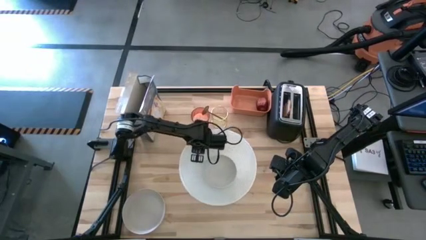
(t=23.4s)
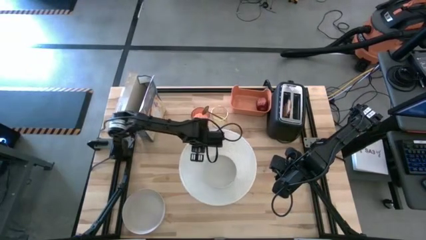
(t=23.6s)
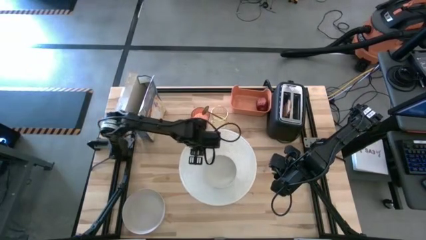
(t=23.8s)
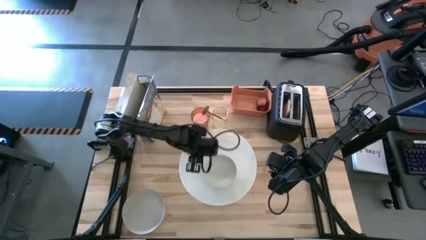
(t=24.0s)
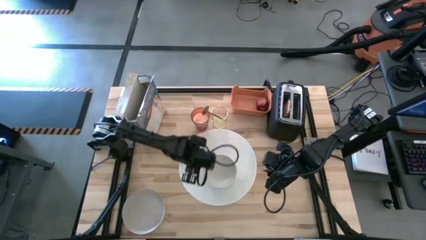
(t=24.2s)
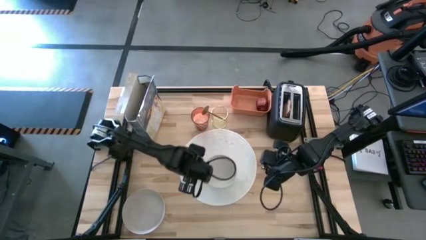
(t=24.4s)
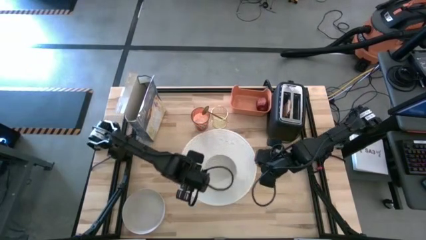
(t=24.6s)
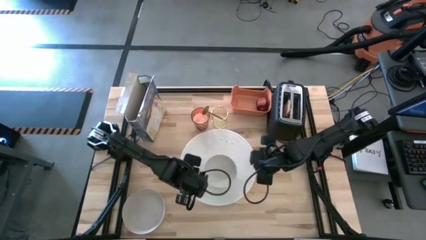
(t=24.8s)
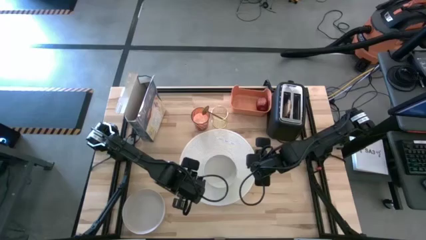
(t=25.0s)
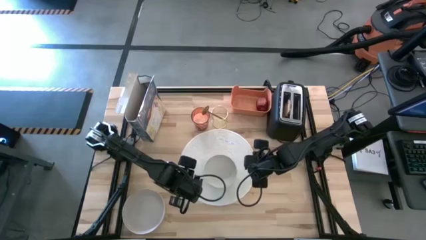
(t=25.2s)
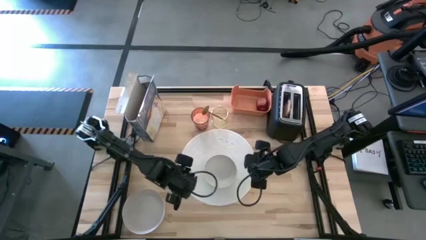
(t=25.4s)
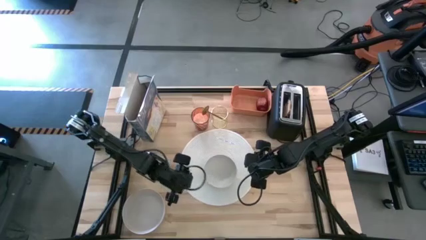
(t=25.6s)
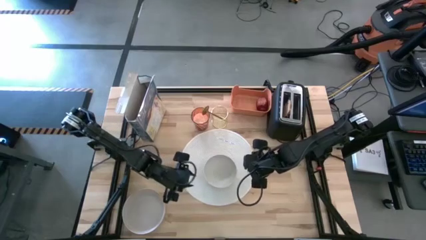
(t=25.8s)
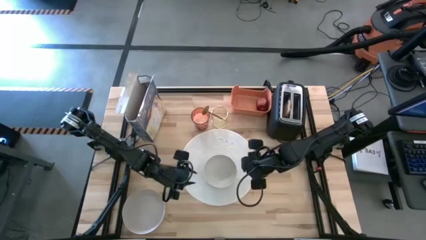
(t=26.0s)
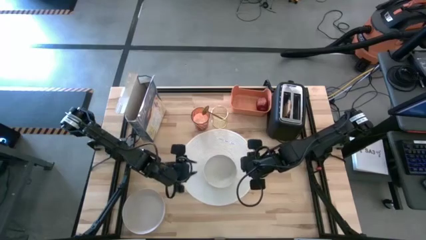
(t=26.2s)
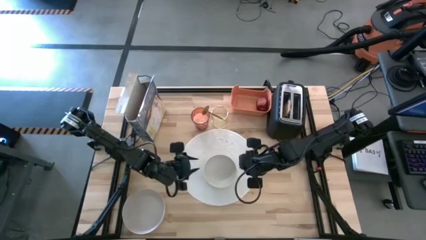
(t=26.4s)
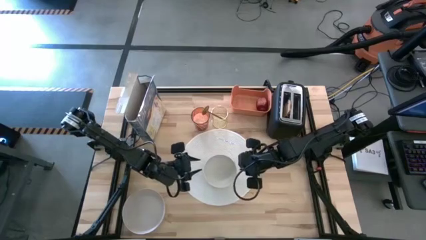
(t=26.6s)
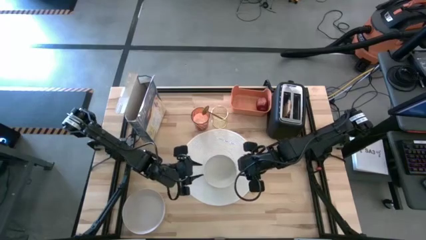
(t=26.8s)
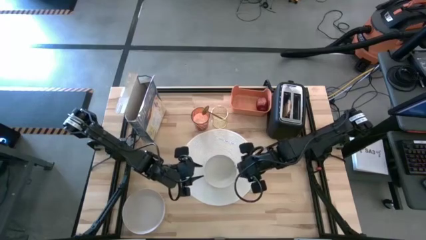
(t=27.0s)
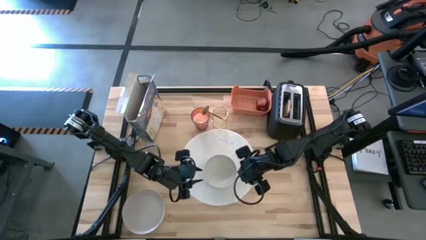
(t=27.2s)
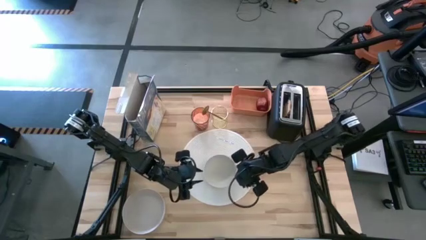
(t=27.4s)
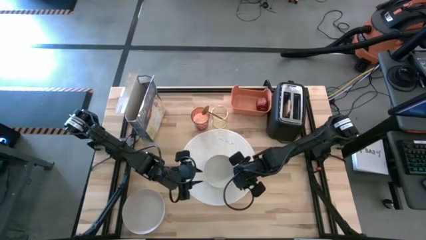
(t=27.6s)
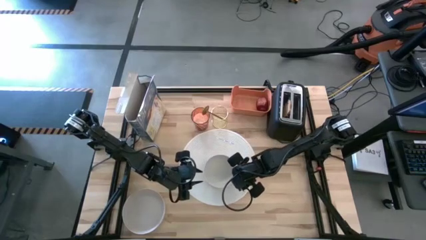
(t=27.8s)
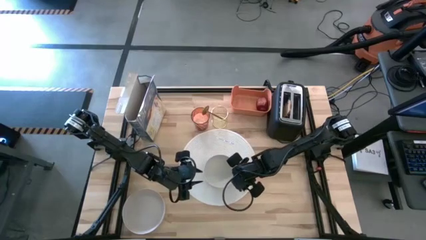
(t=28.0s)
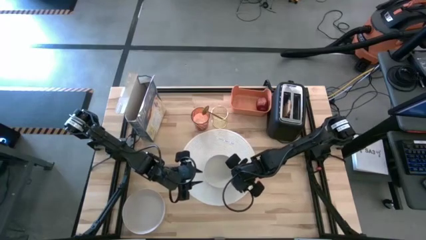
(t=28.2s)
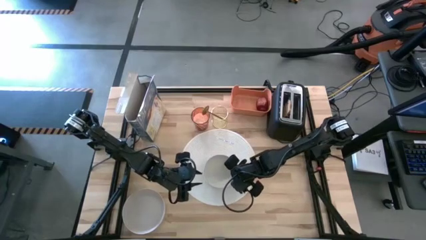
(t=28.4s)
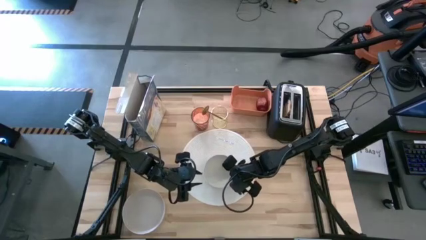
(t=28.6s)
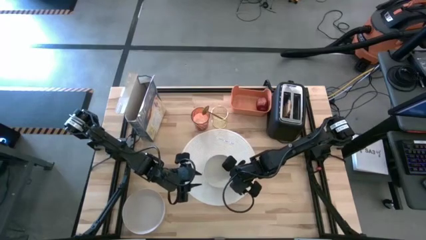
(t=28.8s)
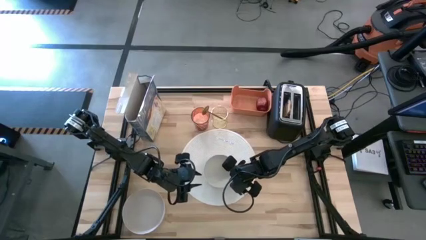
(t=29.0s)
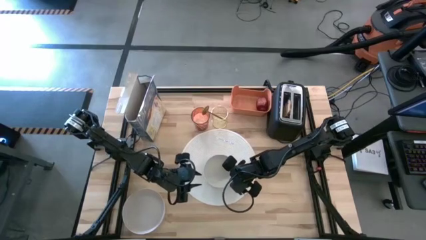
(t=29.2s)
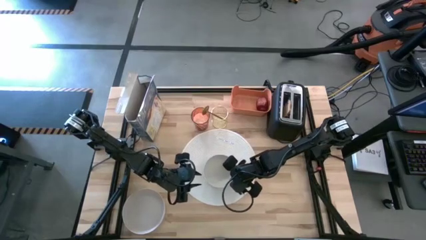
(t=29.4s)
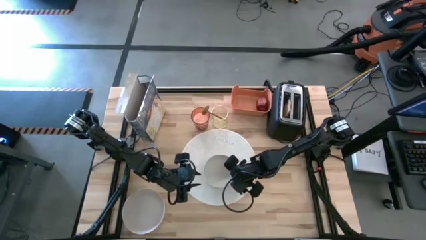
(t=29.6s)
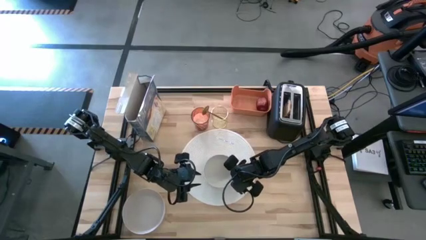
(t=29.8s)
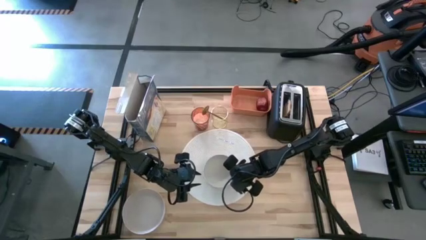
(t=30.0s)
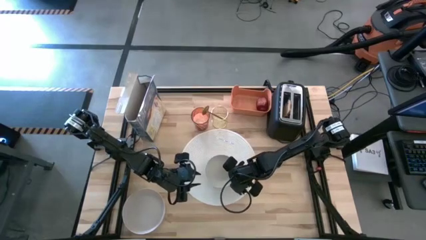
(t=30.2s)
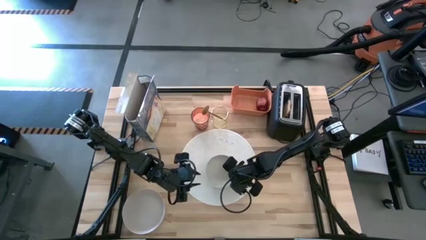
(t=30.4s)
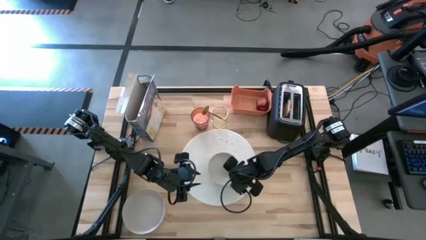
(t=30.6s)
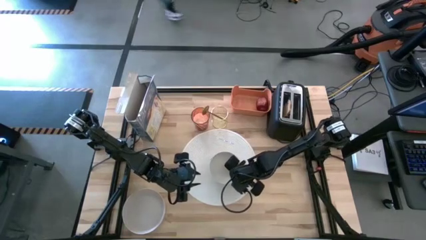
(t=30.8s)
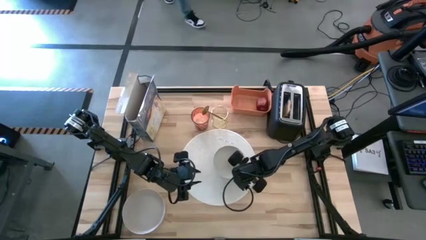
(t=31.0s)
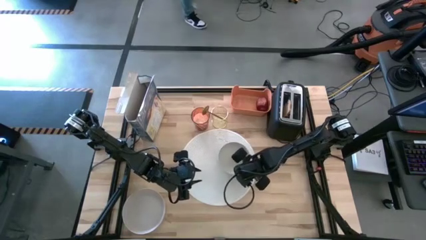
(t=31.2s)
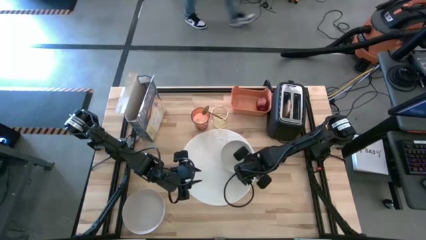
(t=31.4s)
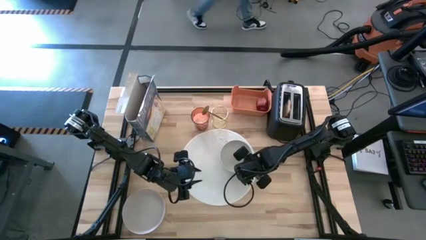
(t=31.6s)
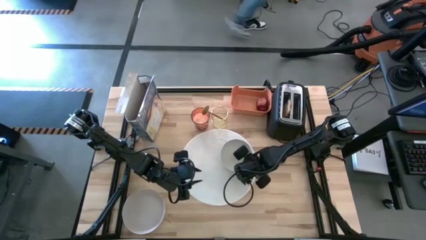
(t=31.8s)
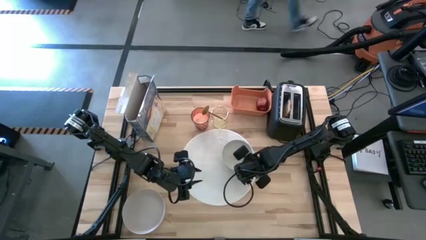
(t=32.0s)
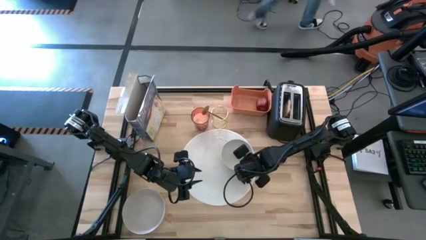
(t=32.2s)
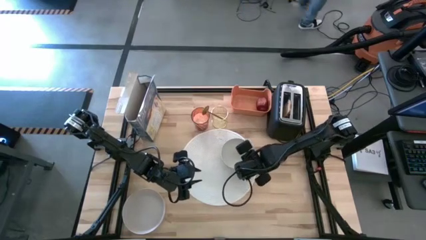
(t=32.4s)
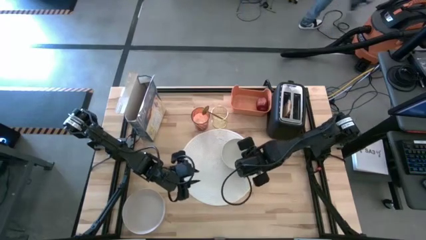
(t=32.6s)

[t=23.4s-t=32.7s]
Task: Arrange a breakfast setting
Move the white bowl to the top right of the white placemat

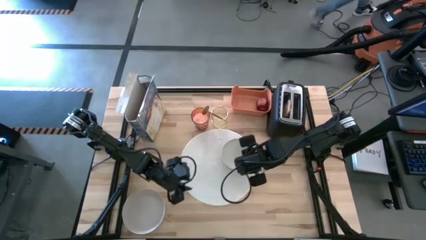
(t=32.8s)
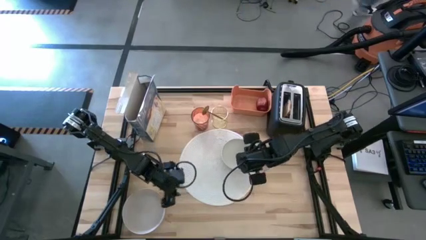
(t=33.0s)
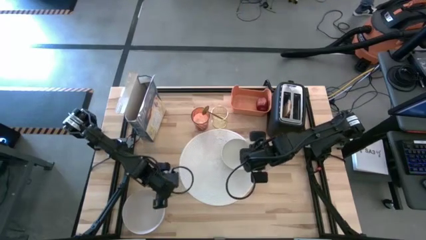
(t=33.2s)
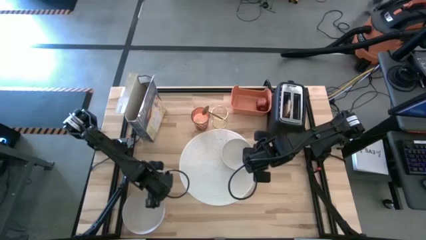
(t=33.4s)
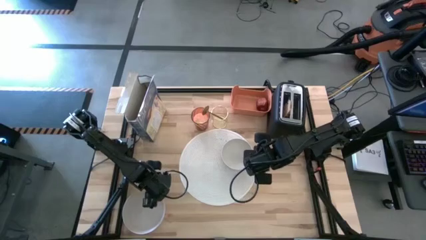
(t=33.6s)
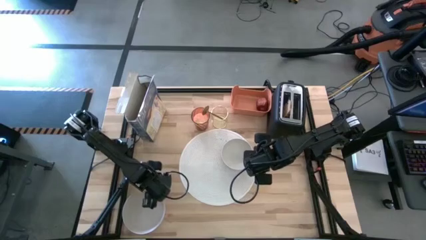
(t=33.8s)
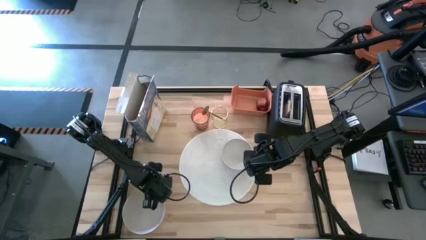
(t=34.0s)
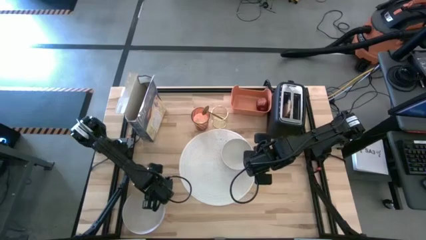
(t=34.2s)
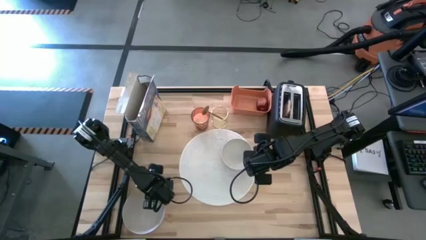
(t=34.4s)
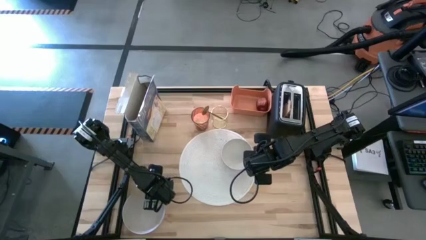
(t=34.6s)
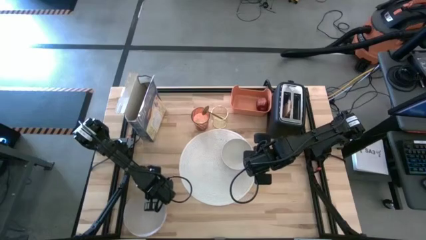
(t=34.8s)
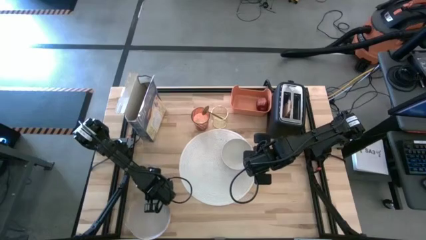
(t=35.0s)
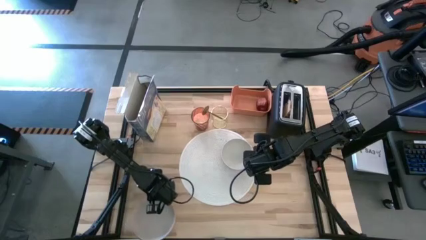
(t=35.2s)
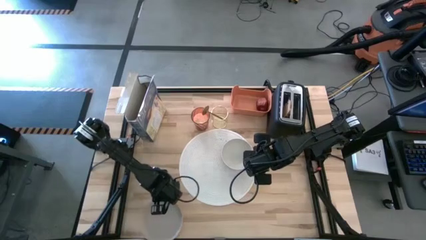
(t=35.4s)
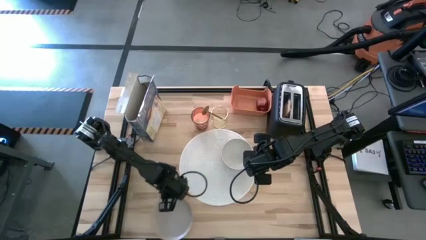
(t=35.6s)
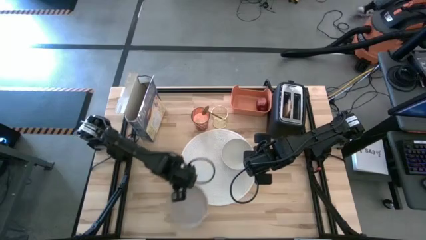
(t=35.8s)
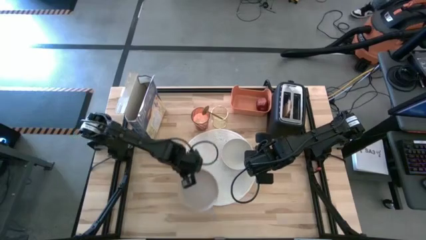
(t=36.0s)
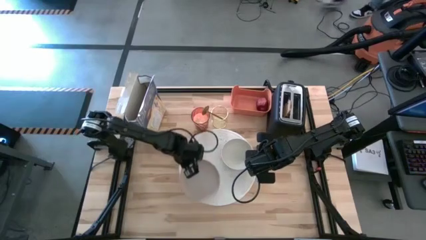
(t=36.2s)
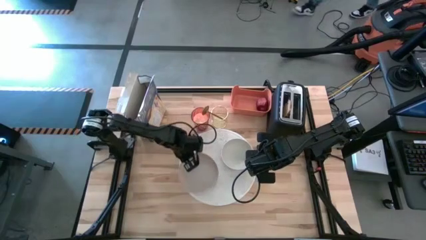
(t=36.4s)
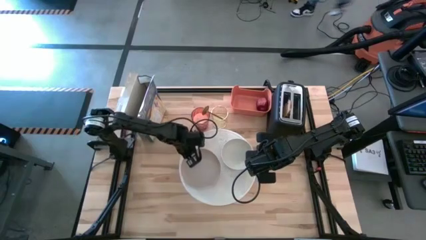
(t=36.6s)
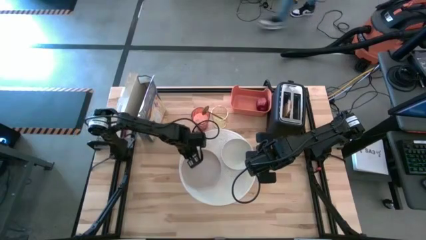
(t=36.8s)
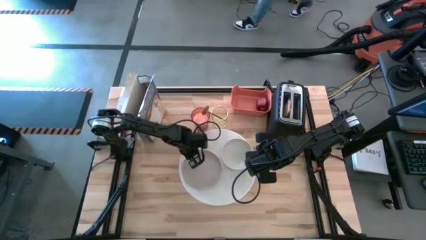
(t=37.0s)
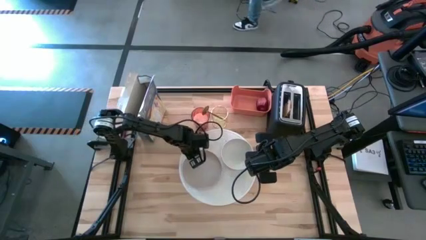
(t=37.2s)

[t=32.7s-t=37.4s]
Put the white plate on the white placemat to the left side of the white bowl
